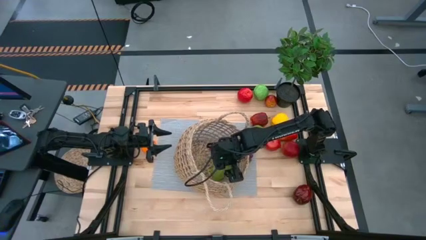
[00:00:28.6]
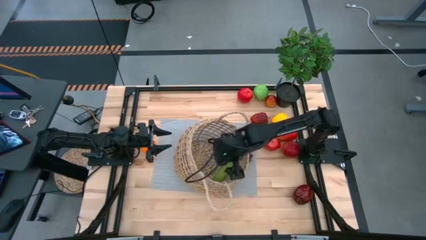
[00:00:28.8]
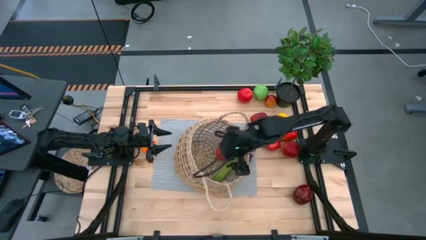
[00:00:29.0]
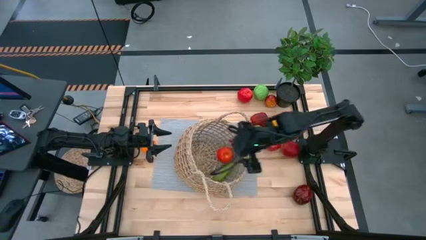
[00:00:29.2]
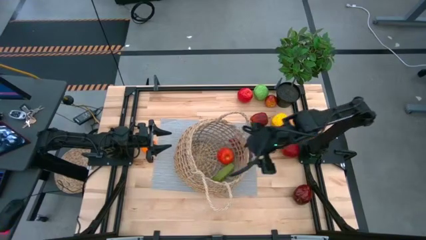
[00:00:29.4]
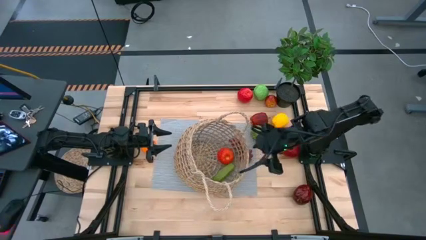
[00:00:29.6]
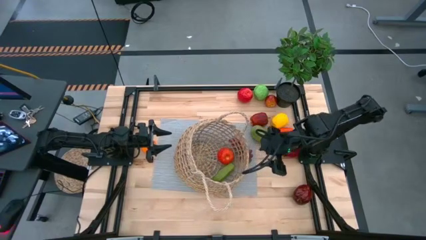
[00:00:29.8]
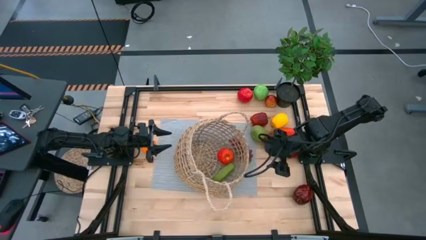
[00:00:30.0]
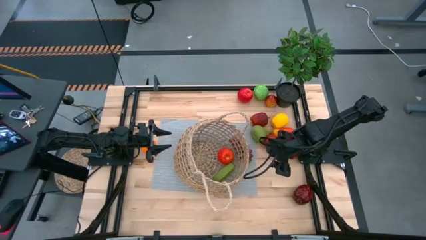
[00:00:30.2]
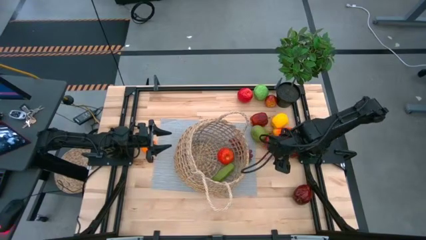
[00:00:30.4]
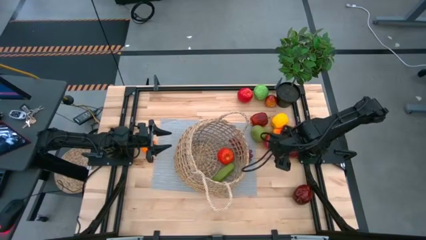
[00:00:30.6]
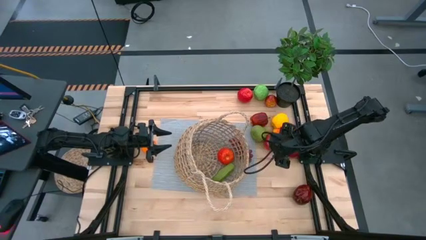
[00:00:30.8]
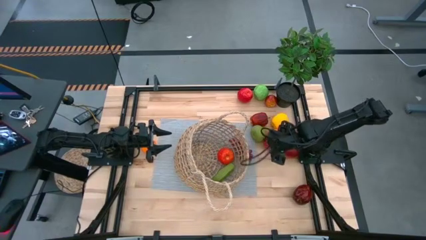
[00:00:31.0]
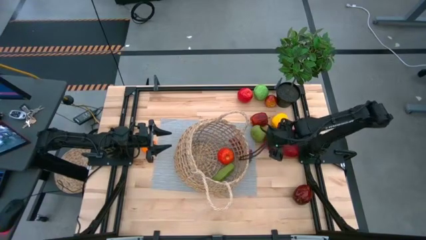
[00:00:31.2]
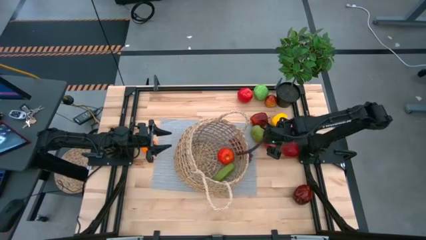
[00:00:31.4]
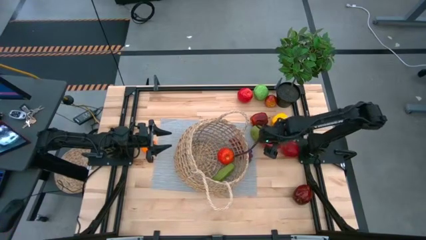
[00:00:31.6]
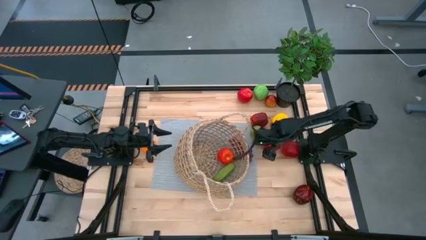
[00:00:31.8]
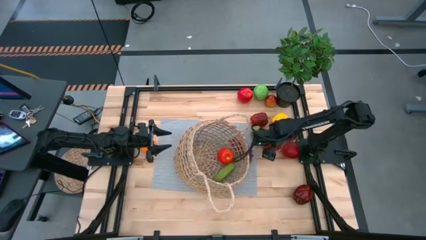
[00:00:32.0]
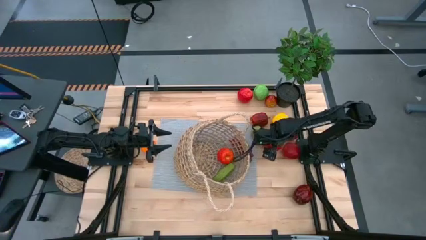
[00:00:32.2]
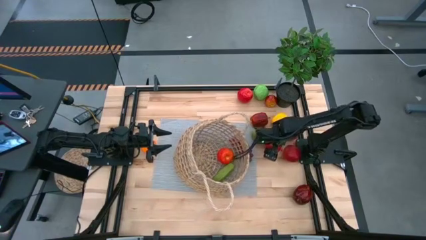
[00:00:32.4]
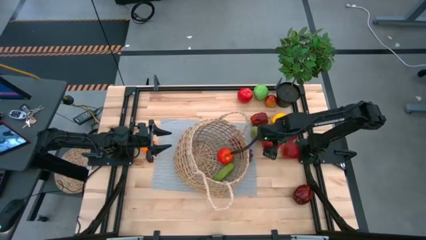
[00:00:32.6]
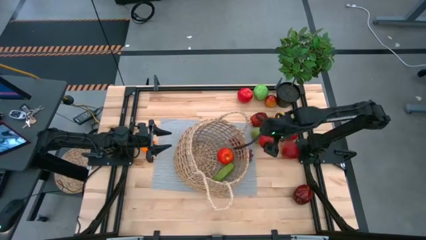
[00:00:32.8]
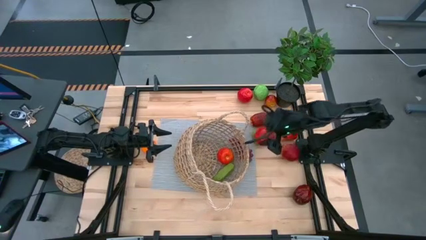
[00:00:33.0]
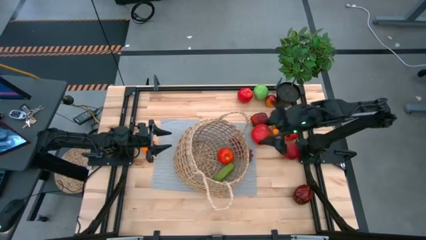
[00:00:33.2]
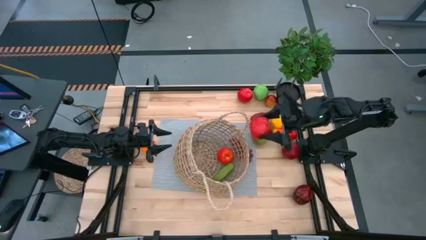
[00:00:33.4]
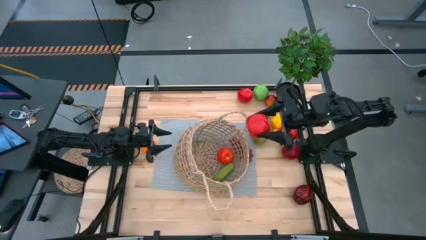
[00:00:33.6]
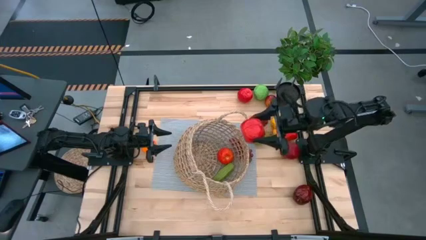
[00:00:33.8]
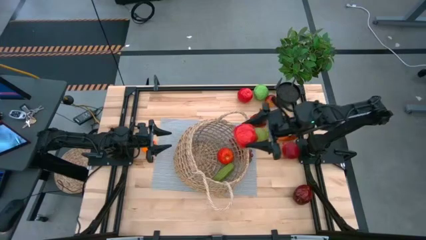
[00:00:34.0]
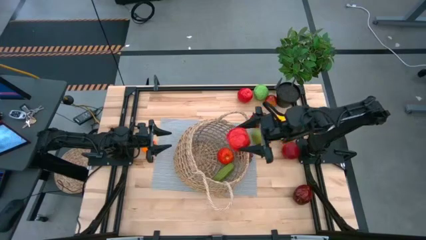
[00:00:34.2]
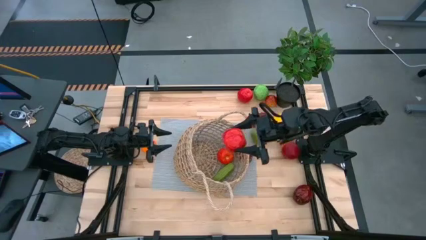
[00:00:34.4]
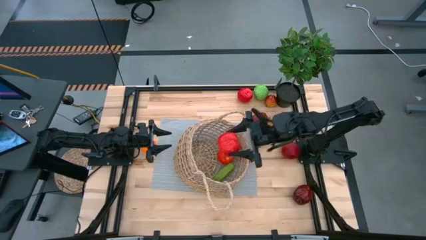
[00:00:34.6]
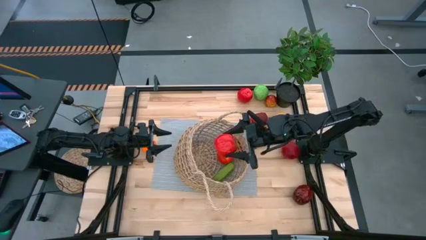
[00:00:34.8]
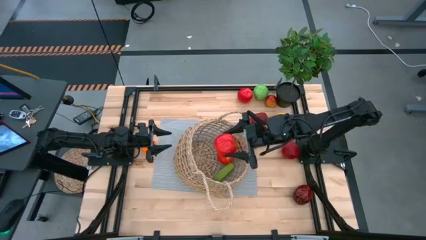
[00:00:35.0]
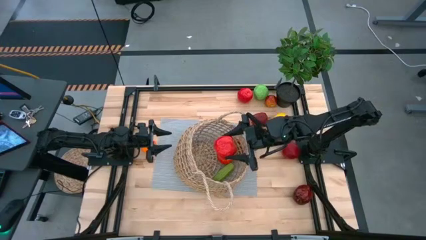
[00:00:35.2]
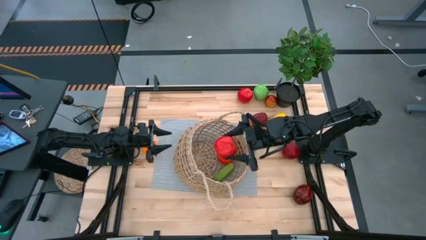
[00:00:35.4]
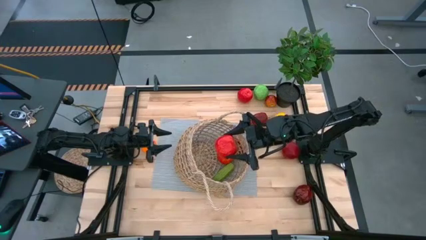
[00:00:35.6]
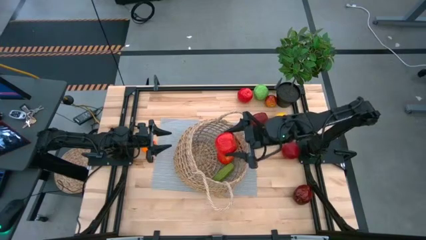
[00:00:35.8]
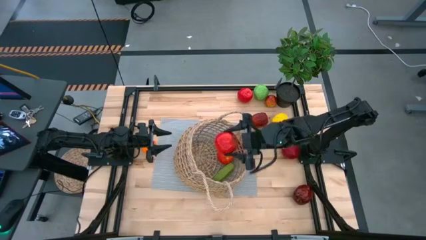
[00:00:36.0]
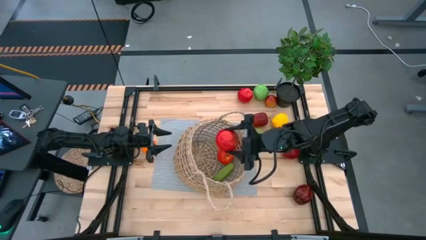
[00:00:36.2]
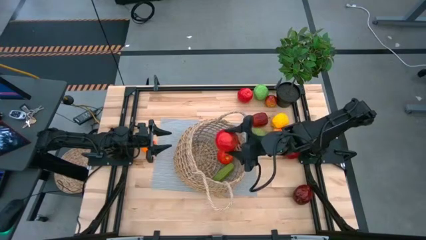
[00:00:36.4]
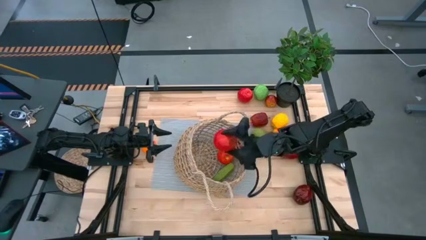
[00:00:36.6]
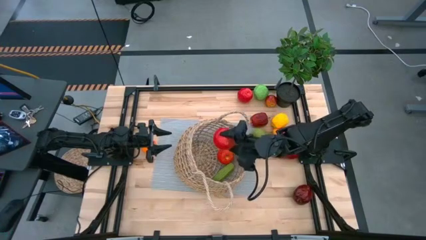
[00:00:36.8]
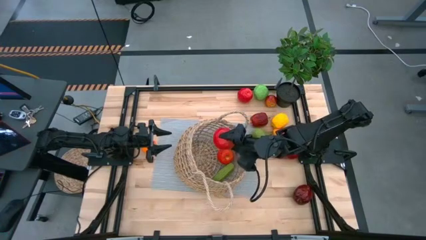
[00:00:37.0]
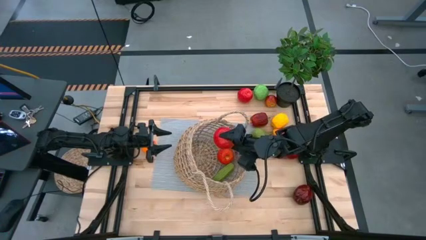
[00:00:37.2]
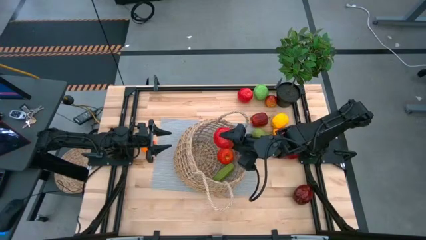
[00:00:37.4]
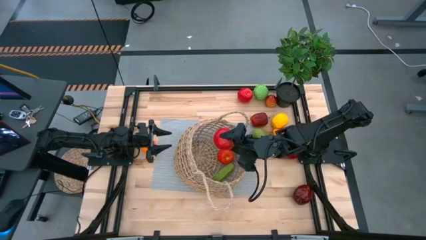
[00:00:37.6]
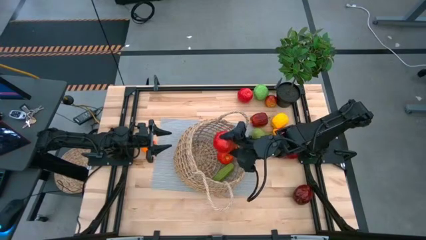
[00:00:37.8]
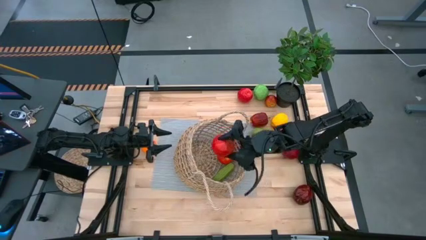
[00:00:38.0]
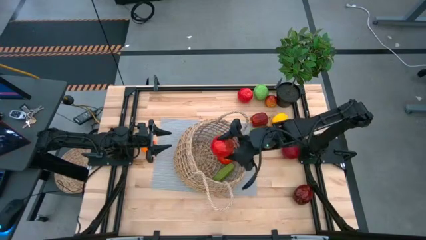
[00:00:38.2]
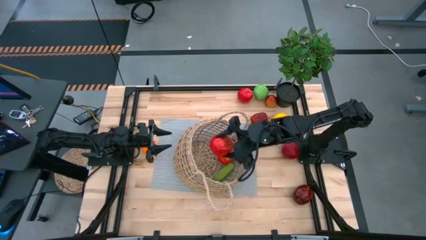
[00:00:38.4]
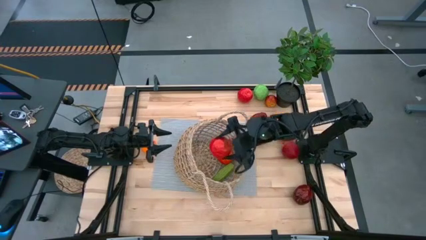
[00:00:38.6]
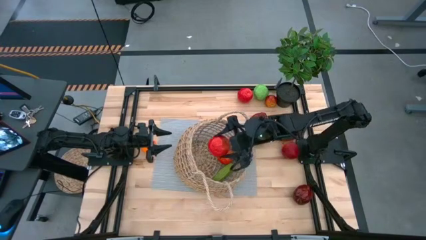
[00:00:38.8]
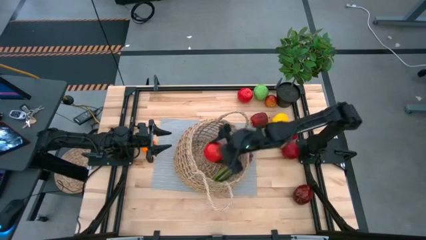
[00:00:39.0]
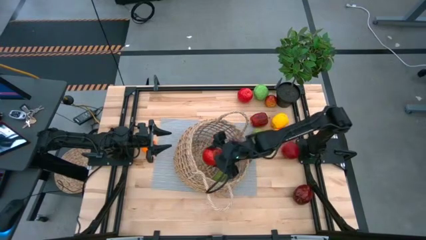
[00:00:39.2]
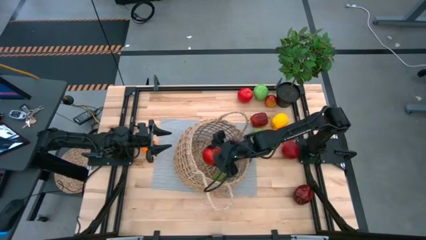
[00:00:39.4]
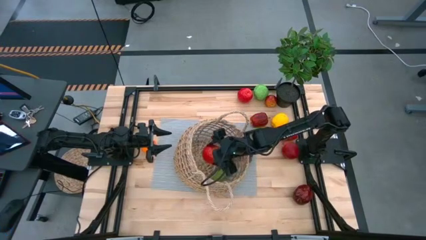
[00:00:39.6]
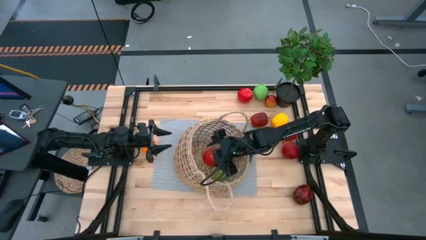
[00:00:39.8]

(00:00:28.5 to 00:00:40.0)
Task: Build produce basket
Put the apple into the basket

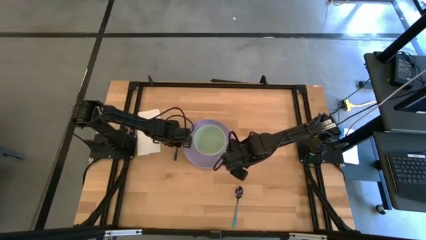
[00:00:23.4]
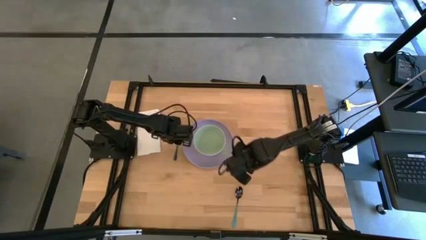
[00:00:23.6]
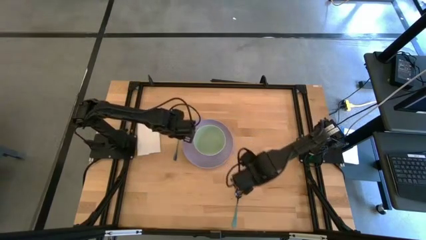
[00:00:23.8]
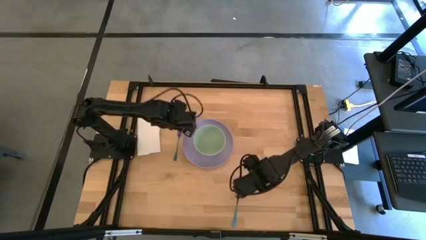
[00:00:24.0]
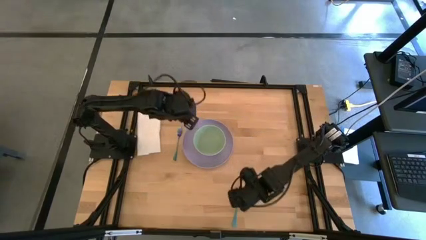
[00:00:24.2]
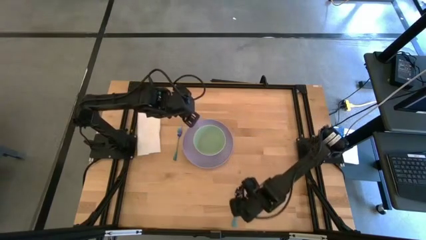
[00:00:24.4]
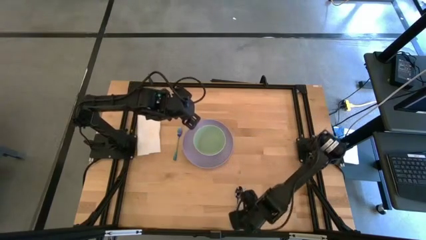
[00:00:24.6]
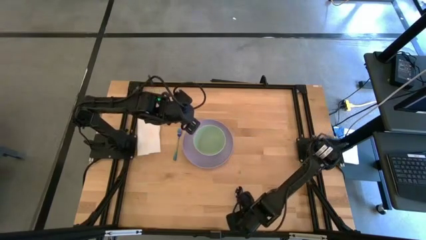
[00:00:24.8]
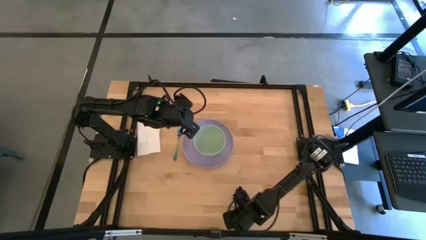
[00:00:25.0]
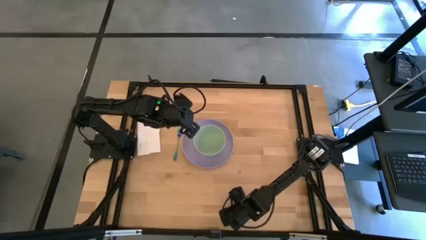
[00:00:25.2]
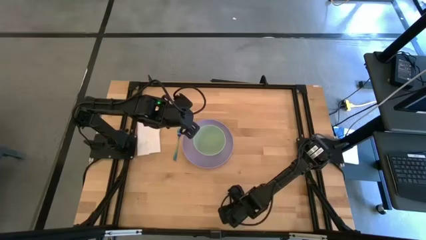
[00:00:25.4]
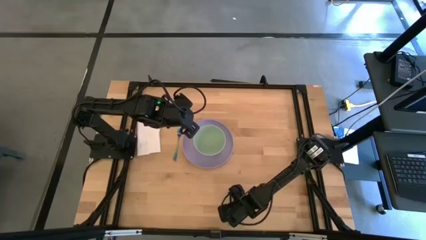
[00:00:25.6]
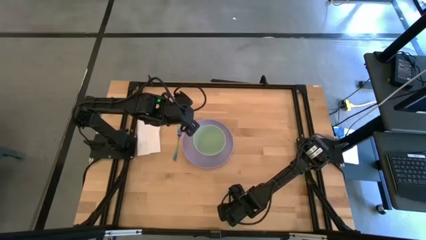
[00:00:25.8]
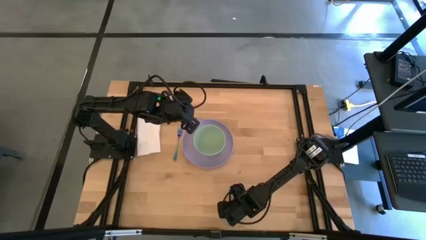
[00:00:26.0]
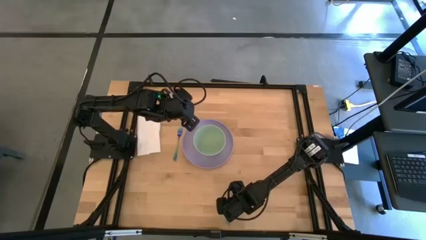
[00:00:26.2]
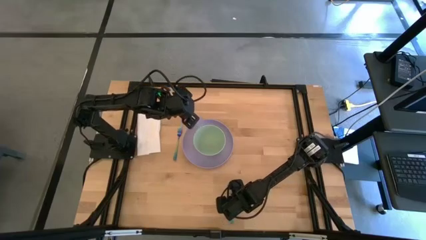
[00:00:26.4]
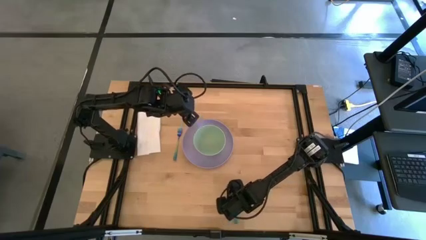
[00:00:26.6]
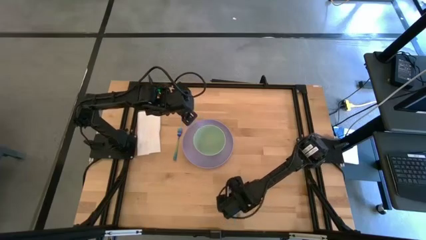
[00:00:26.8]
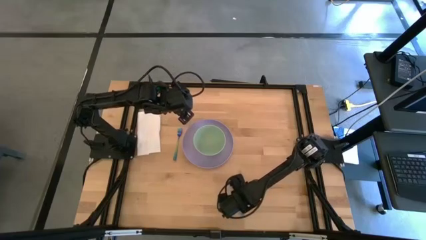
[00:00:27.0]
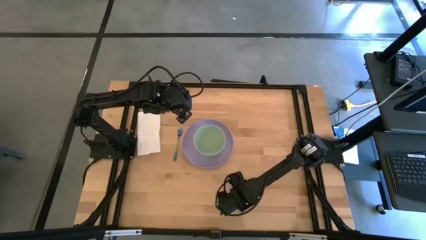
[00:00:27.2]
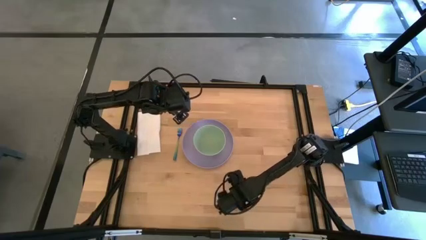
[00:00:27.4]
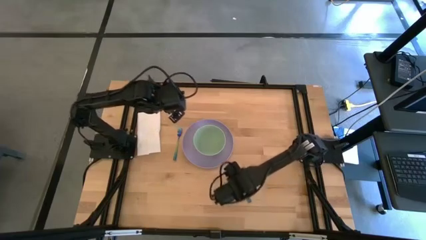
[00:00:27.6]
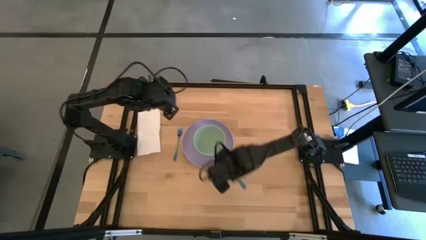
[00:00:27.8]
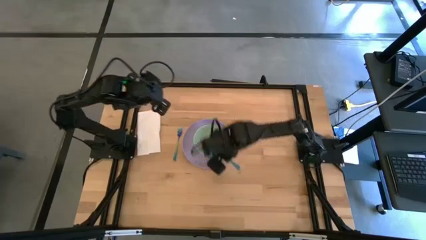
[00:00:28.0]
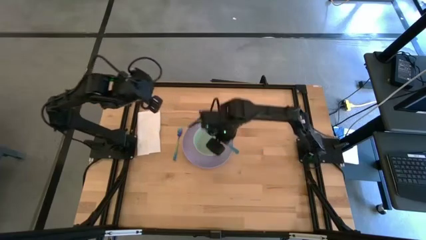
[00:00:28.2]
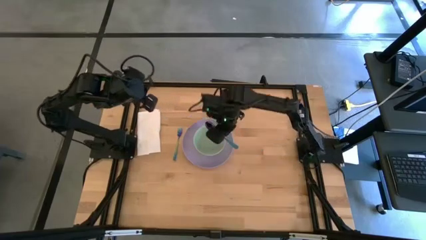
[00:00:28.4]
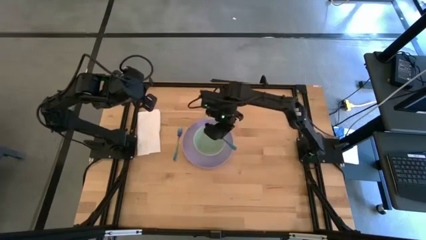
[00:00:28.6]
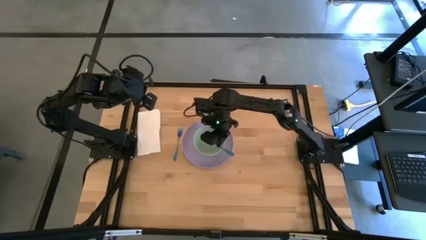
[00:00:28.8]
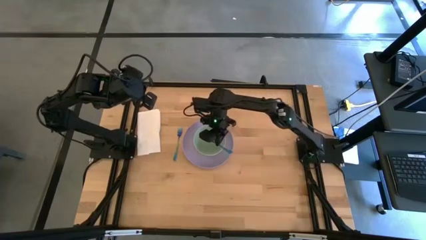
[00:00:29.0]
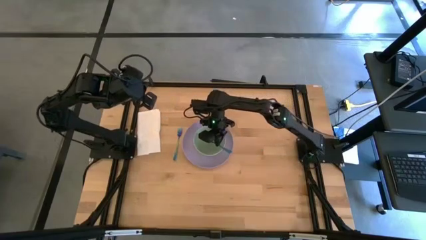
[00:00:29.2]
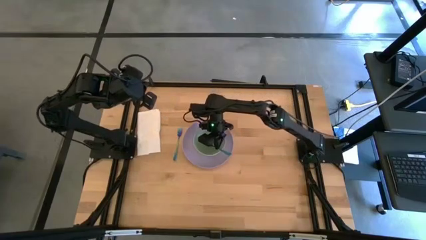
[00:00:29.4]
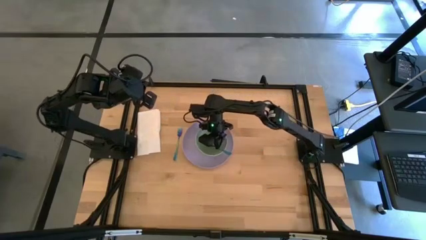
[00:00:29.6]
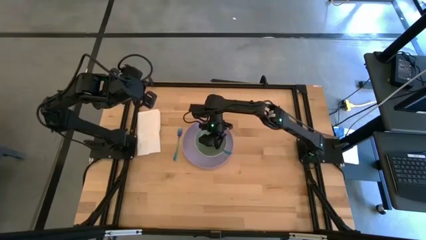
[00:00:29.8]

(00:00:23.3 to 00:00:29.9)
Task: Set table place
Put the blue spoon into the light green bowl
